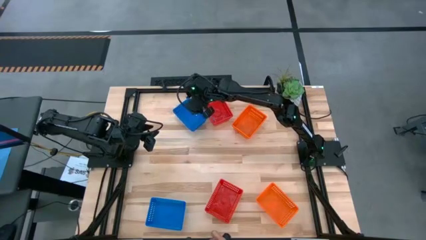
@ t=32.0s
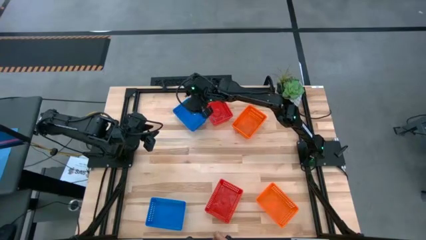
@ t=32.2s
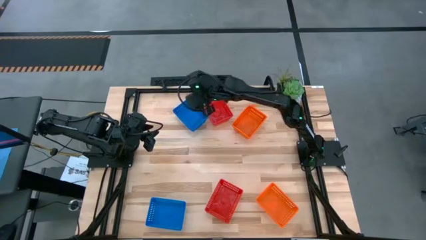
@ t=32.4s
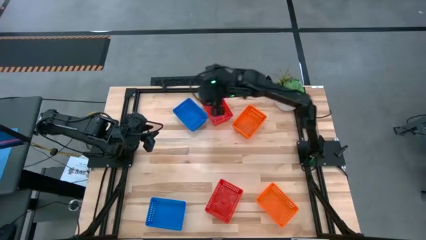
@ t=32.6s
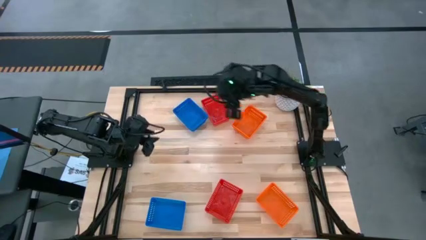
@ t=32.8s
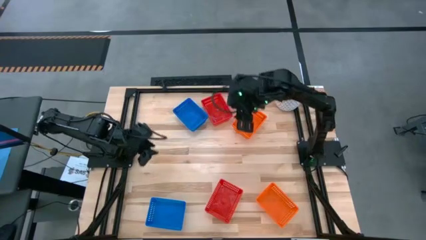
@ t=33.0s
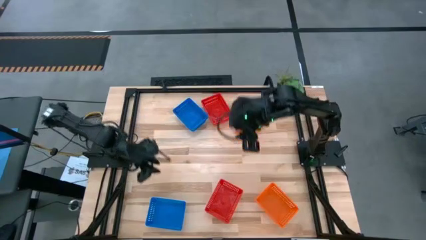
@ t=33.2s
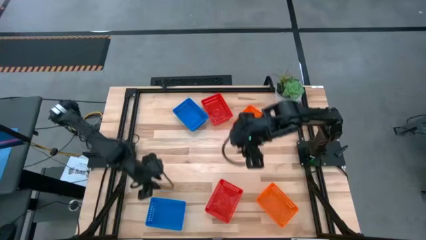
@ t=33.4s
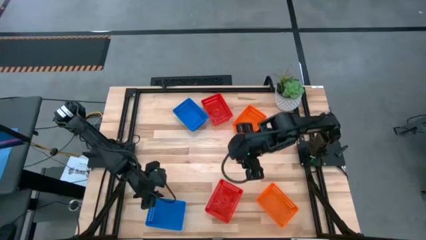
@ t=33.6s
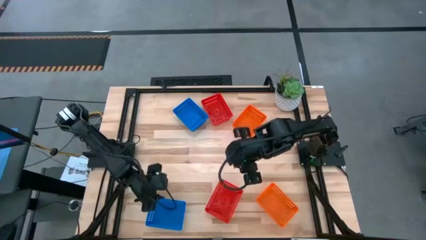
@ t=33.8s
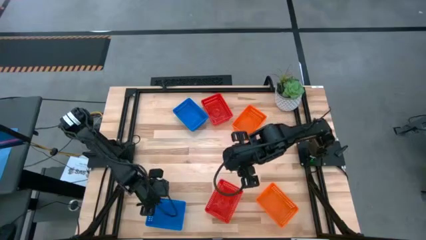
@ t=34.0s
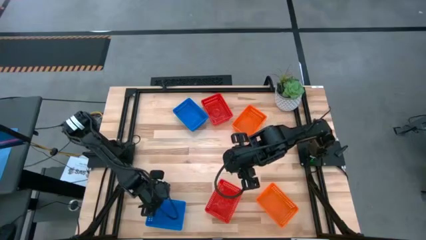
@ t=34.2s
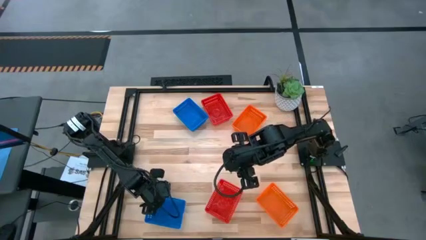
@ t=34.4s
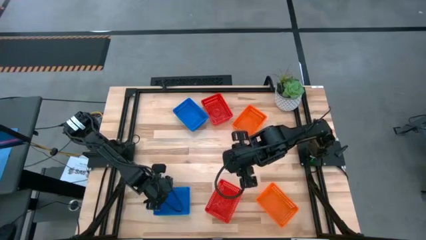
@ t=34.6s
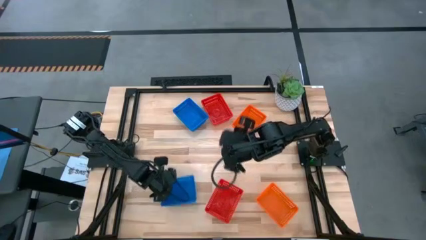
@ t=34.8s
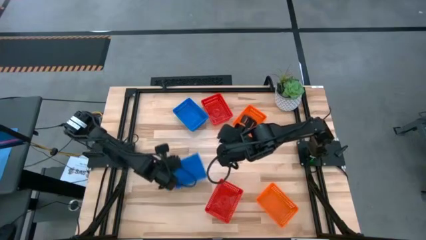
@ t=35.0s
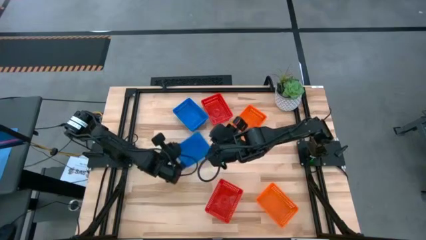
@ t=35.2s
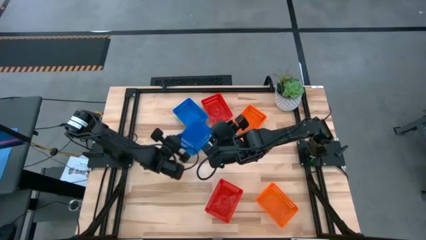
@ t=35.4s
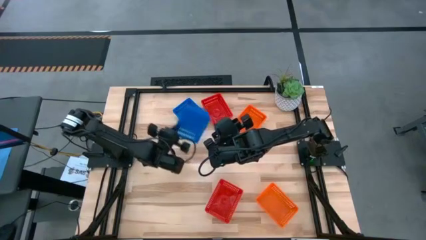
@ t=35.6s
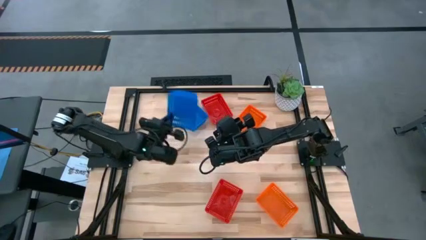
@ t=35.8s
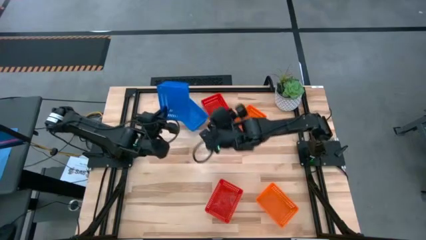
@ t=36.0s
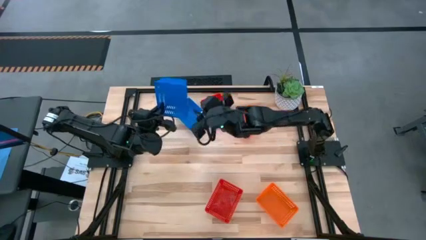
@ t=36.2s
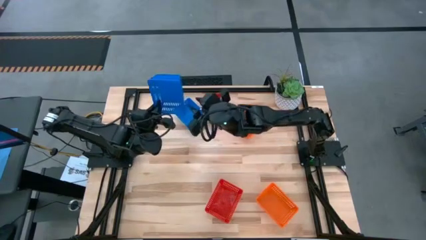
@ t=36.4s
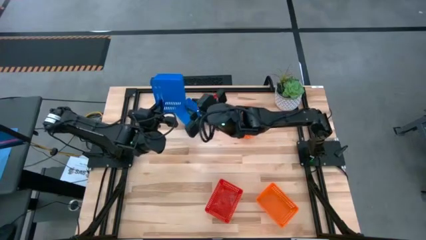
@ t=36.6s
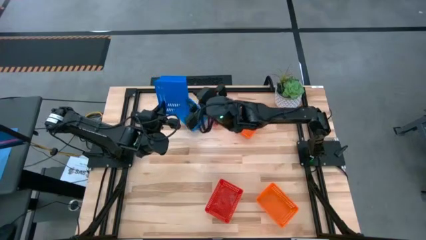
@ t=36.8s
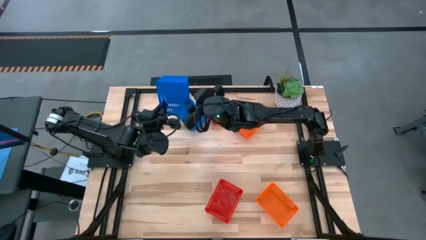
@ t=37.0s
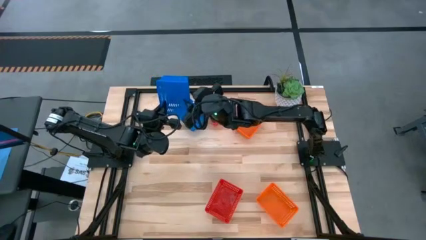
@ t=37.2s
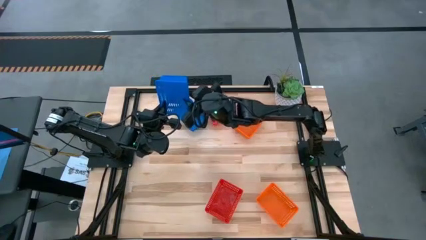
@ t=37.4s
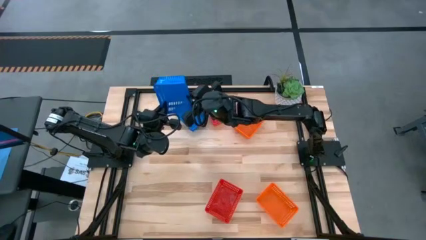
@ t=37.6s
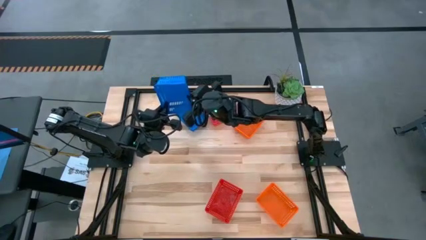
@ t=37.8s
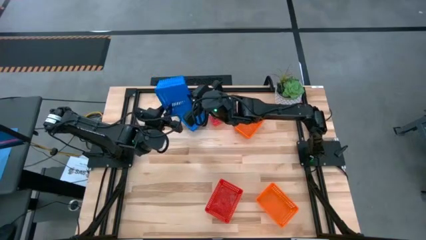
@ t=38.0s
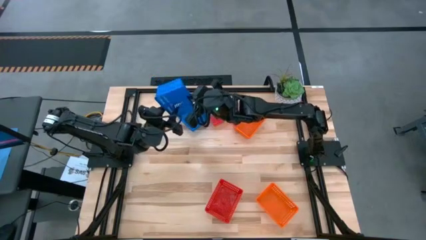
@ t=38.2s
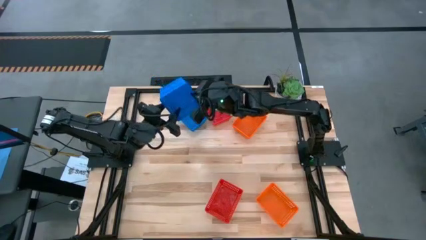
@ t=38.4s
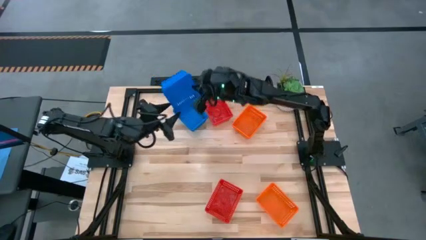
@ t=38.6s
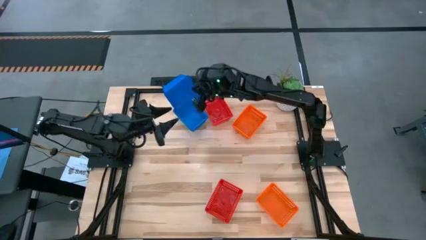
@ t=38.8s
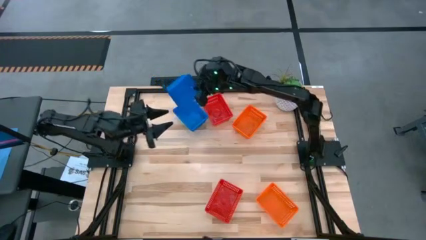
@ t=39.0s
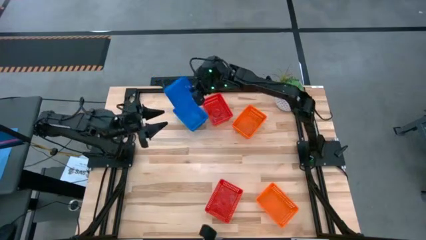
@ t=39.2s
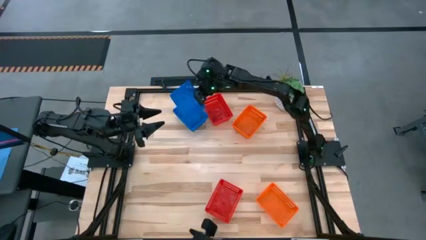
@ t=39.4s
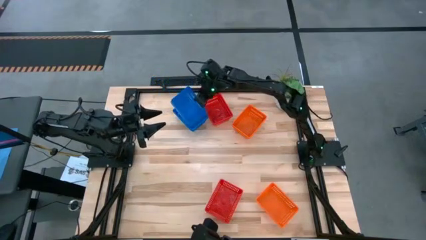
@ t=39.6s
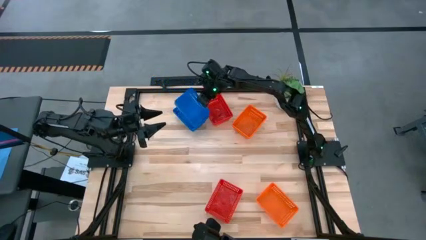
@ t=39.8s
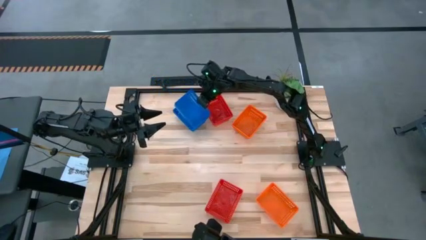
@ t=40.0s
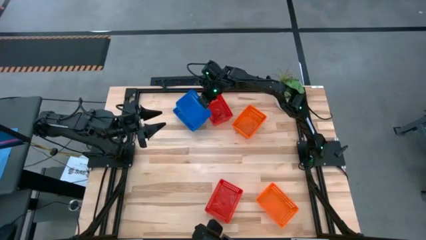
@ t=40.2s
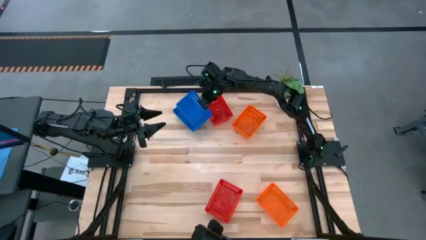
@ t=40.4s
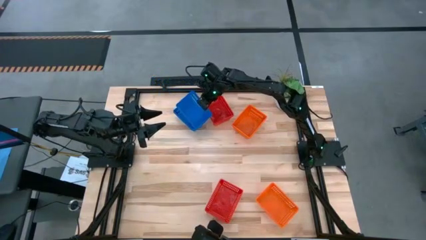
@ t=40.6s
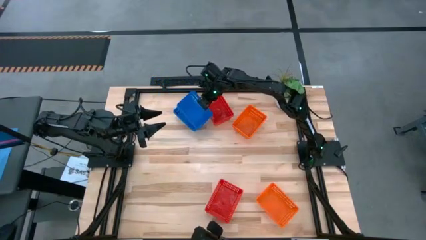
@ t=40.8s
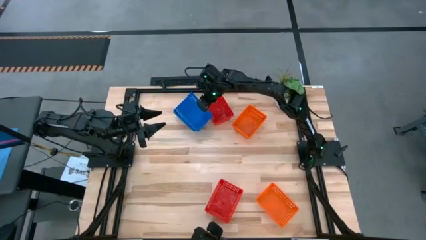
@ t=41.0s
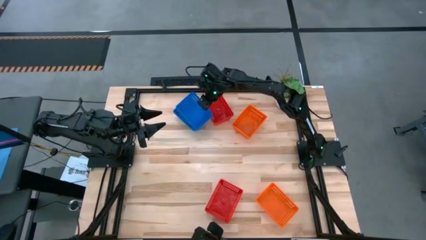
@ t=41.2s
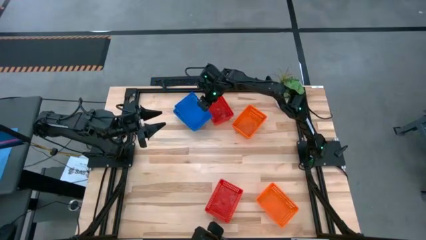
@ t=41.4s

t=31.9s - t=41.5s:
Stack the bottom blue bin on the top blue bins

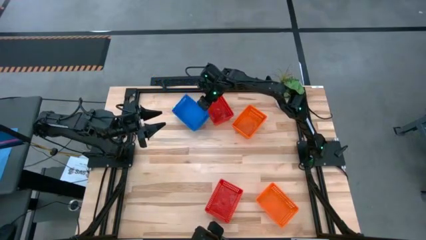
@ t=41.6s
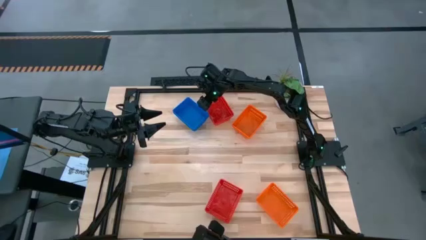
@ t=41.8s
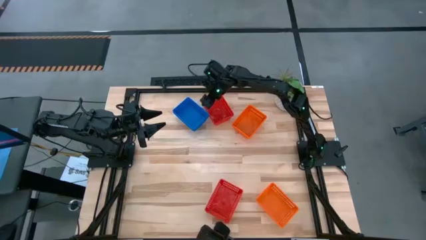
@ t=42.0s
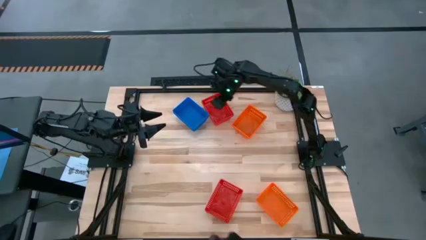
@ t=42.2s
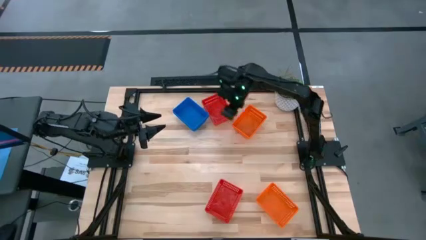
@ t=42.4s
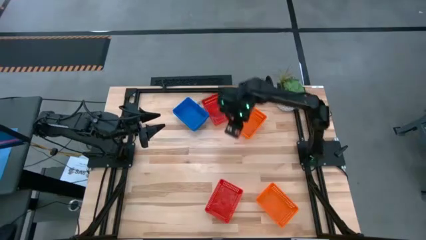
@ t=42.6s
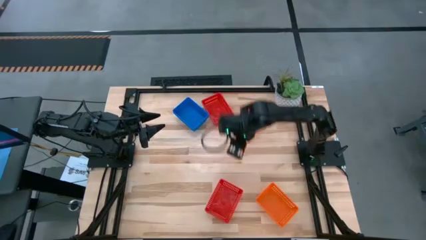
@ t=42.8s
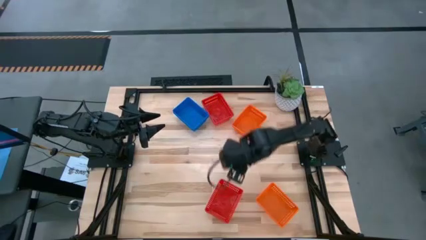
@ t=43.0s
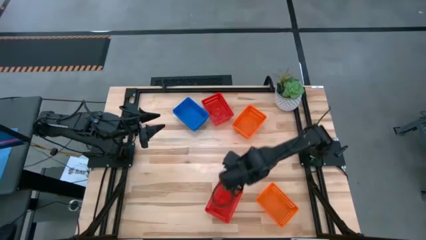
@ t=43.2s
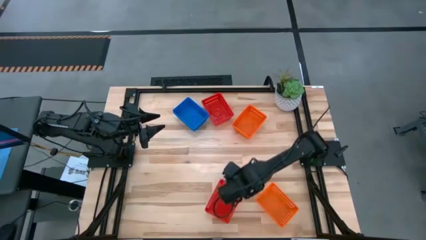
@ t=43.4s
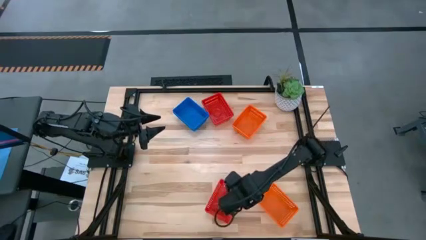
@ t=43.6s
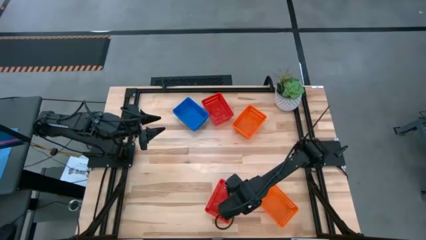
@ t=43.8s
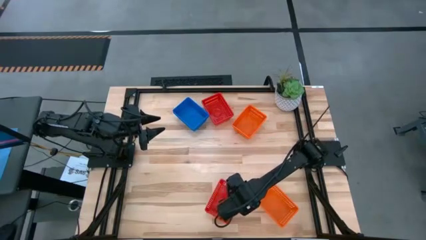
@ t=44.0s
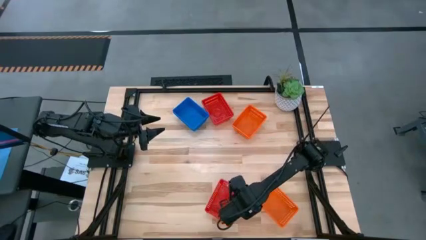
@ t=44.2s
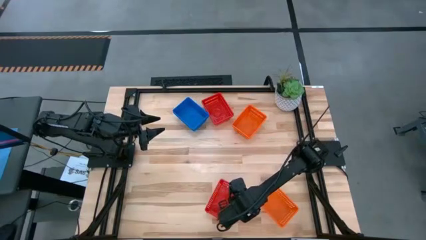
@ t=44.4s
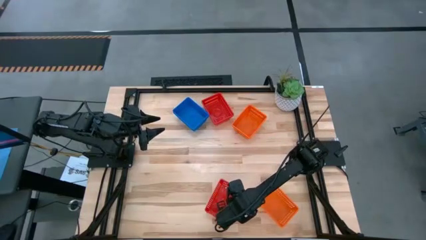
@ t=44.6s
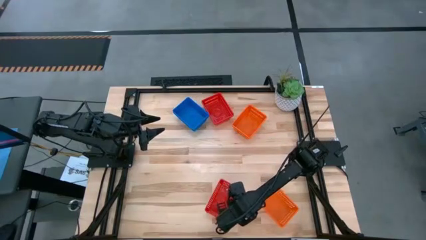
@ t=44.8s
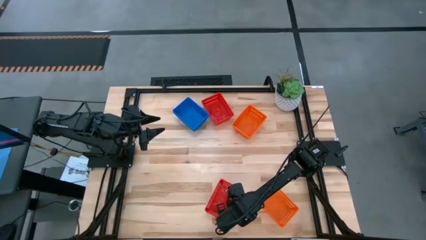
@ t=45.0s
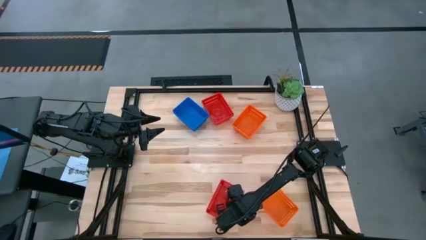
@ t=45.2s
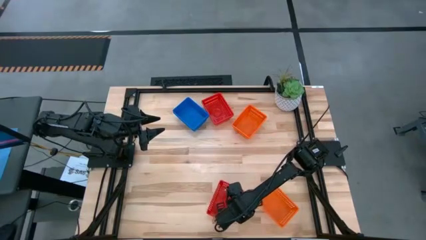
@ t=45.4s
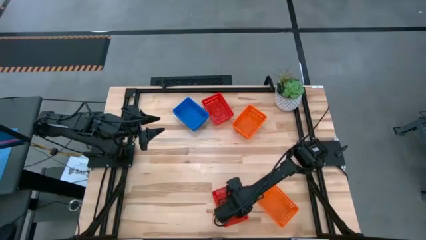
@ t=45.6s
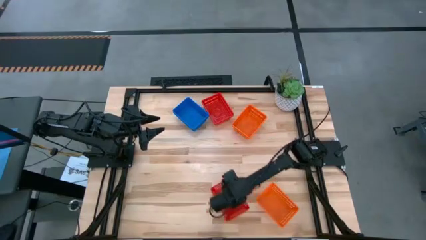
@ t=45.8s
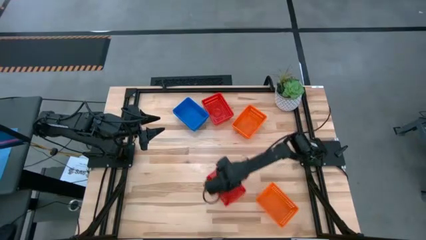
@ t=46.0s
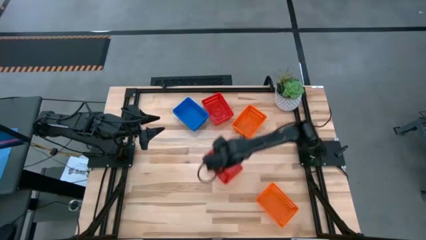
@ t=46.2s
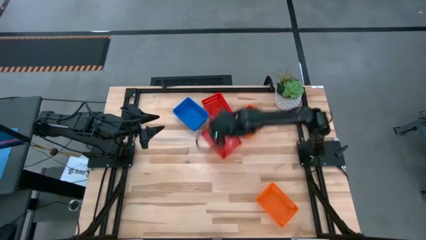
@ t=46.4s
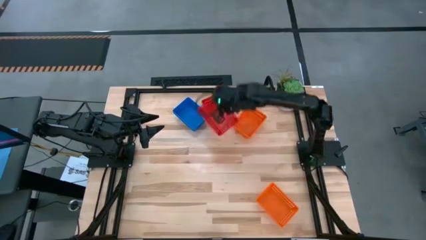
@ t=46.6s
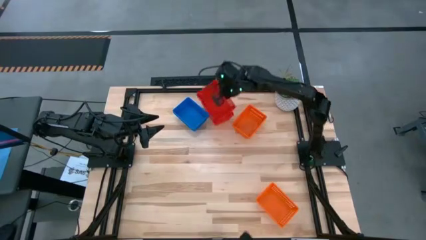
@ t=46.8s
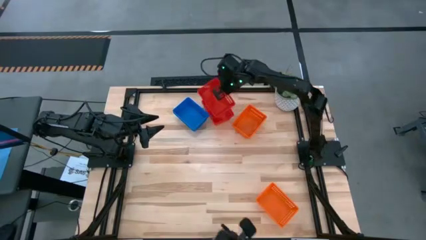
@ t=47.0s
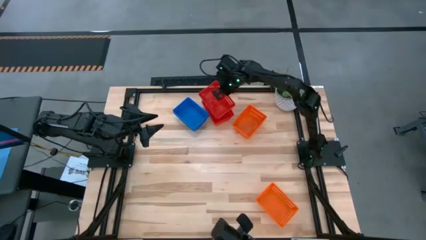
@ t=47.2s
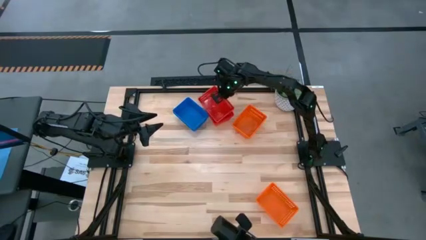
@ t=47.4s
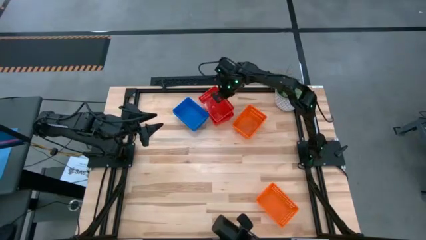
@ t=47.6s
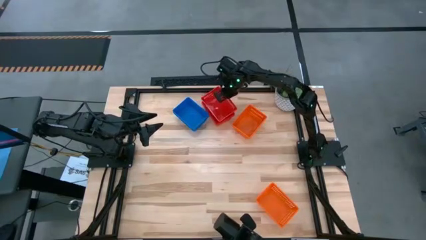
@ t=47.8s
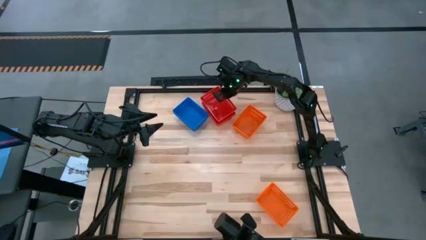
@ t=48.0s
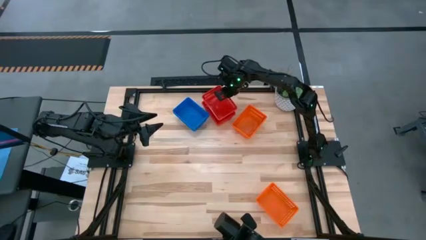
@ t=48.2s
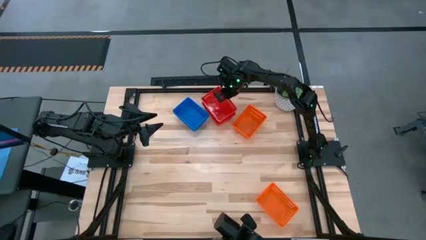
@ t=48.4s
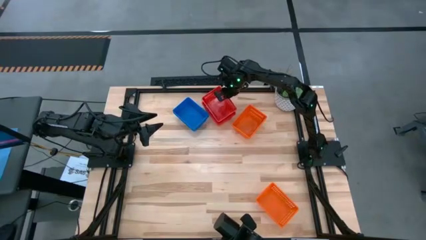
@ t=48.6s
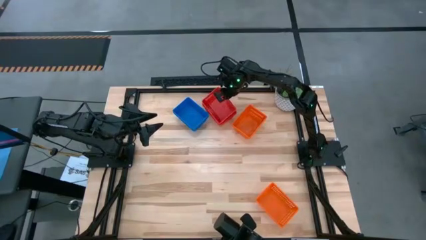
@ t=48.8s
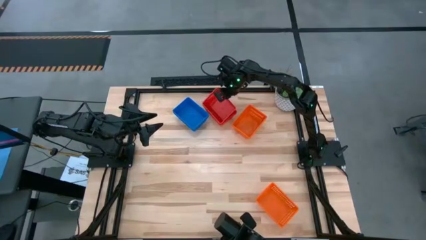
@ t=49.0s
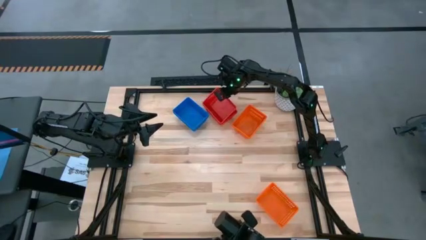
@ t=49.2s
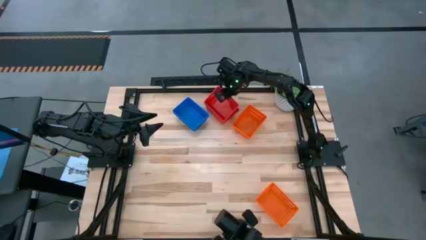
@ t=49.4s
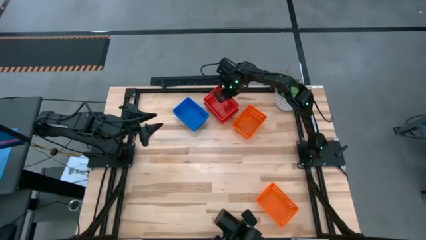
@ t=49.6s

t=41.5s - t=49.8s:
Stack the bottom red bin on the top red bins
